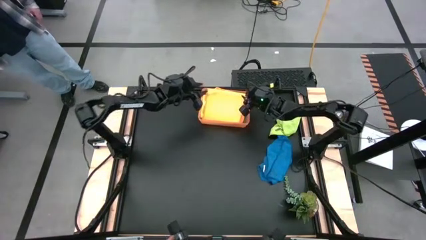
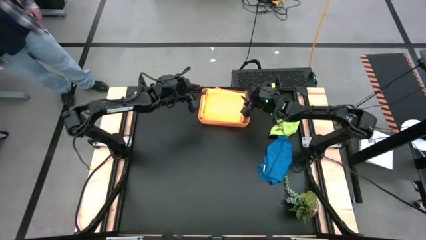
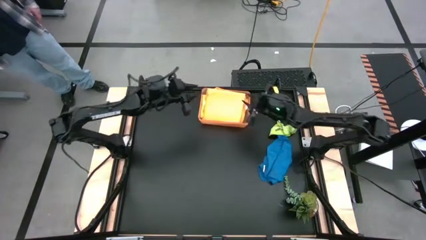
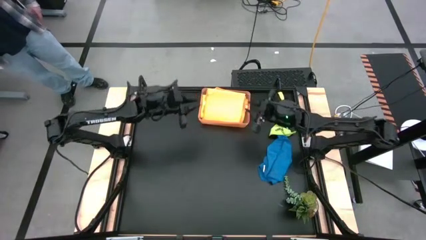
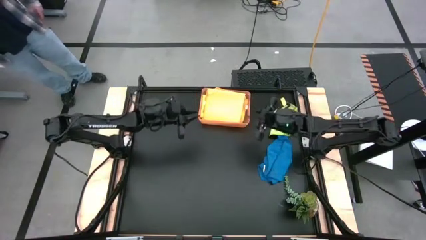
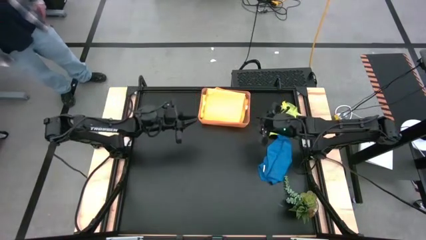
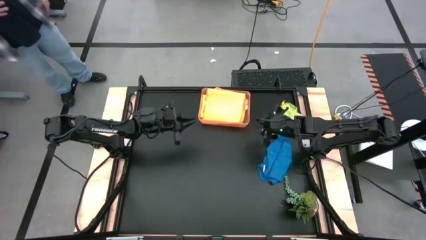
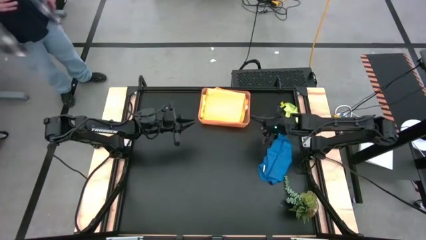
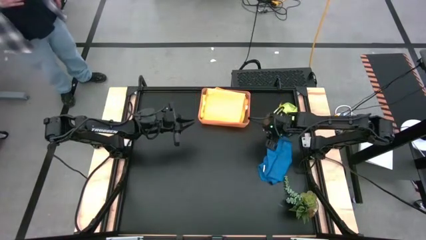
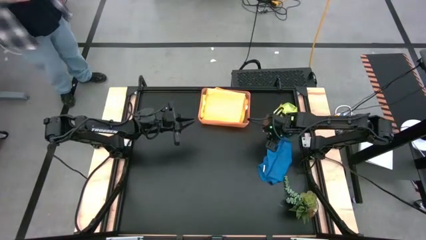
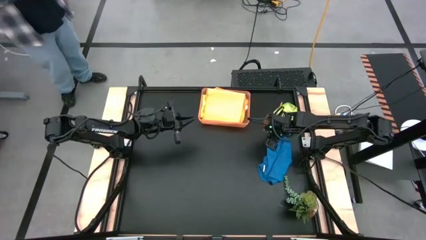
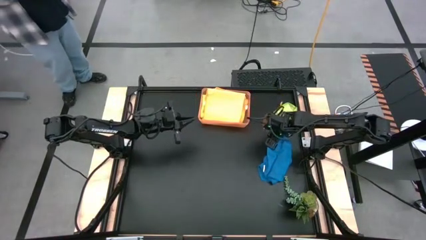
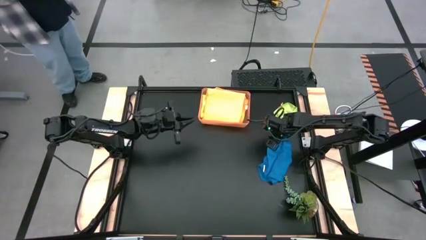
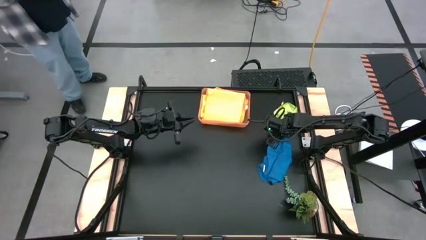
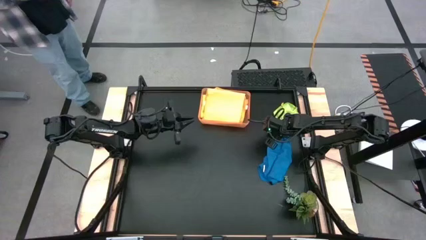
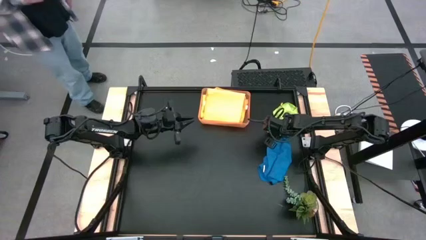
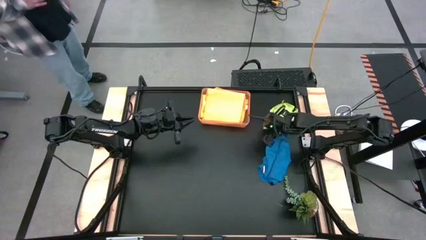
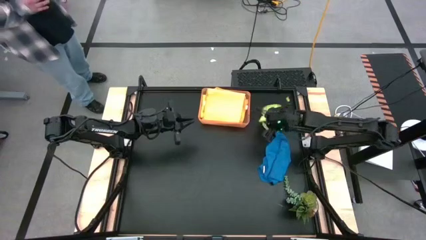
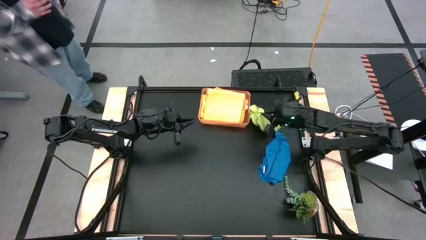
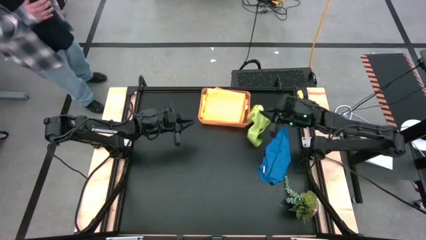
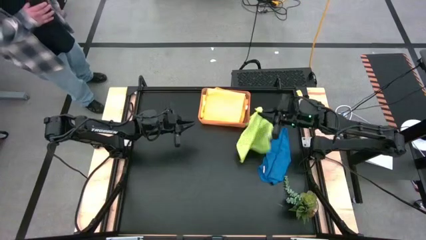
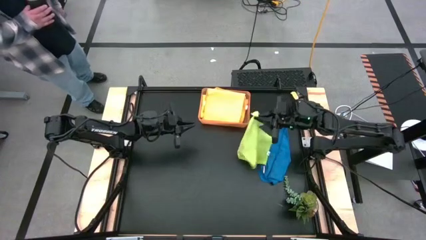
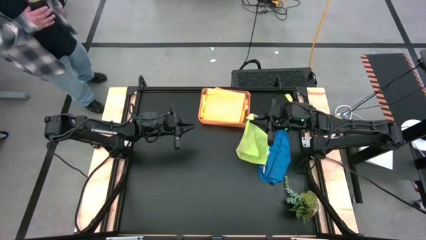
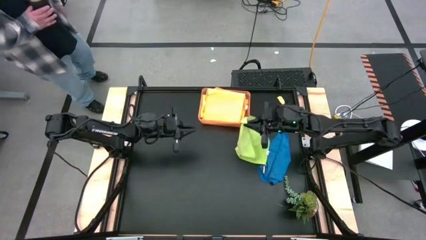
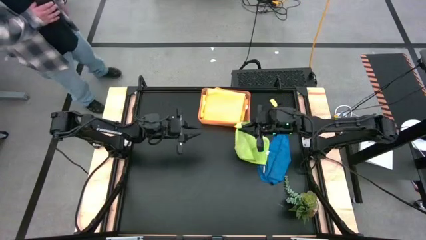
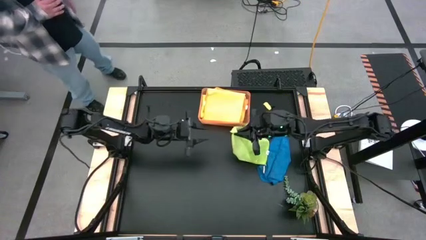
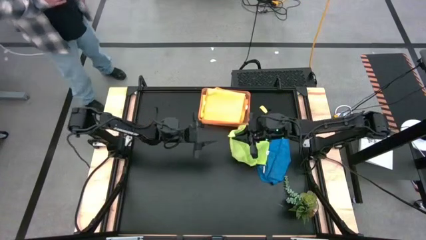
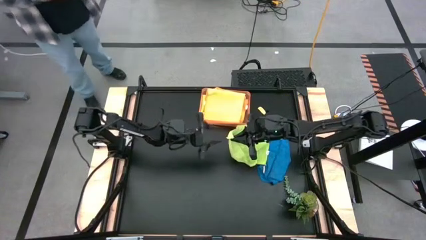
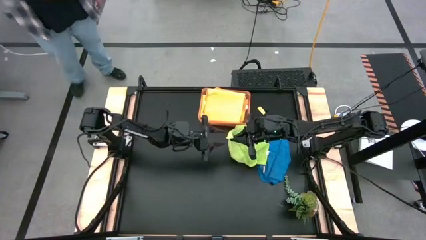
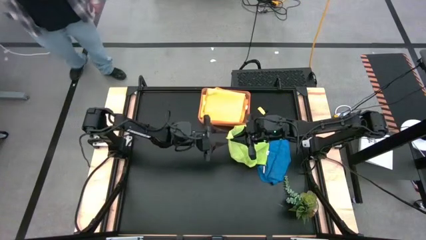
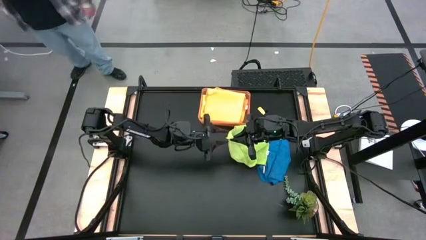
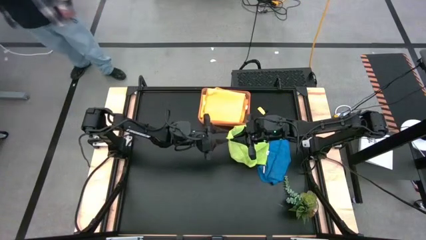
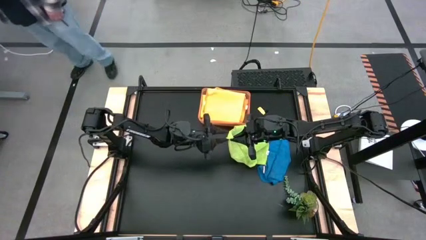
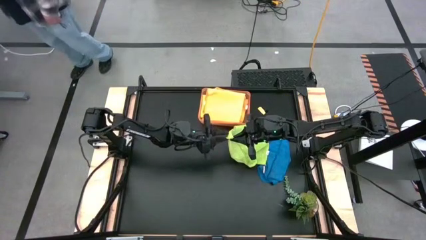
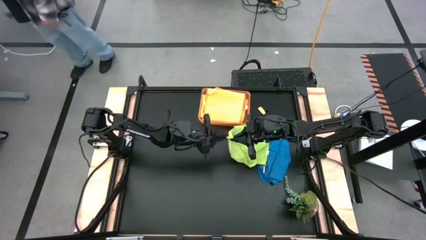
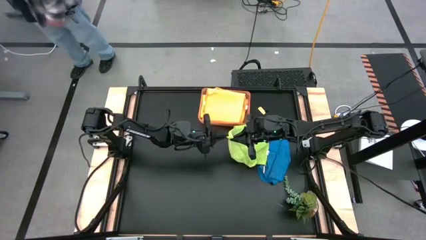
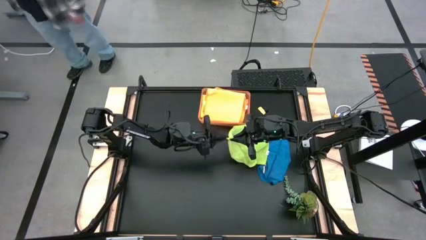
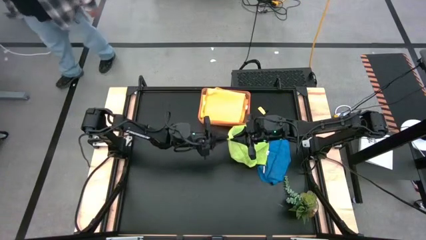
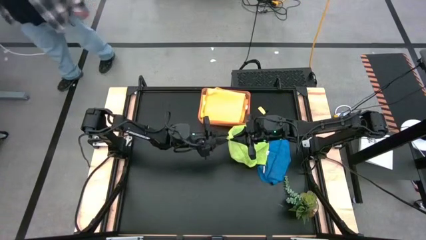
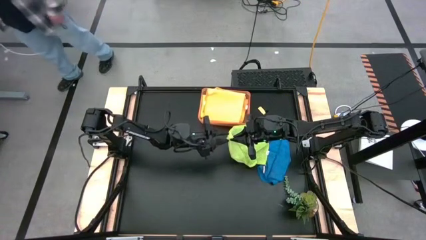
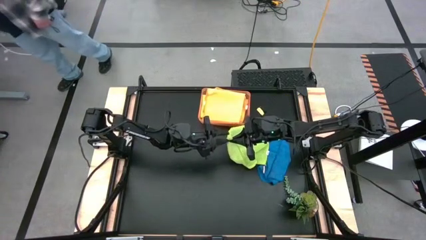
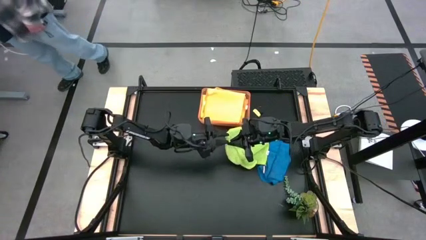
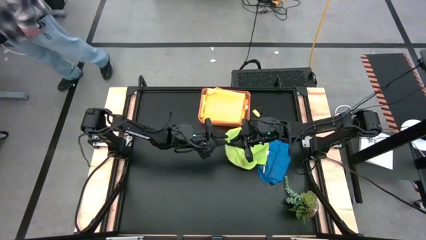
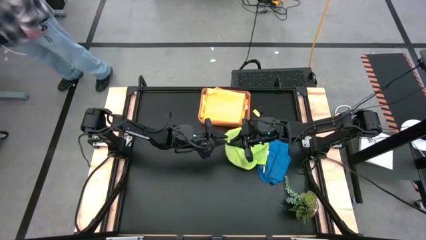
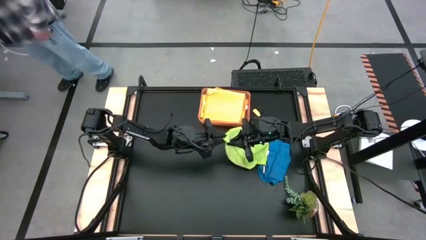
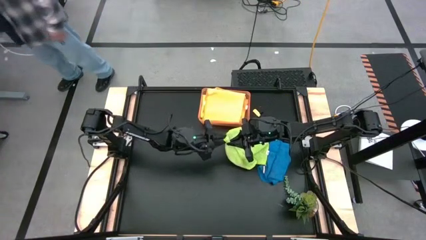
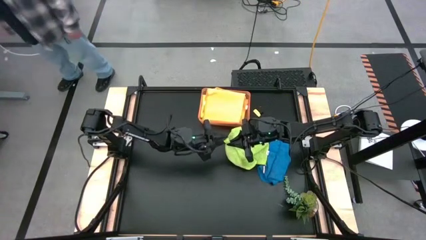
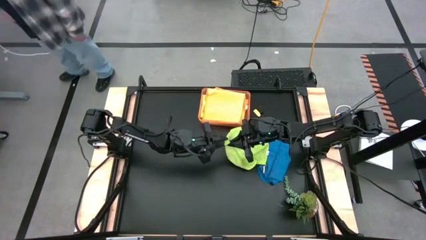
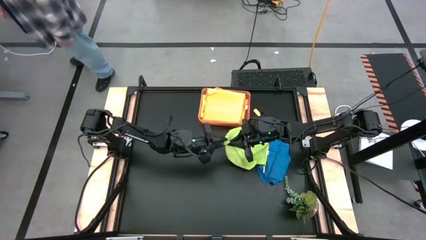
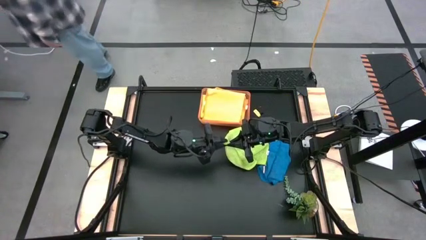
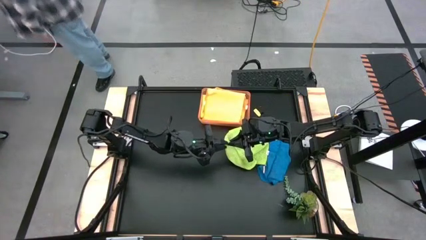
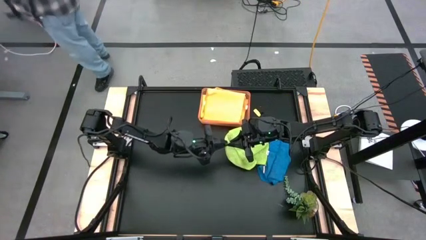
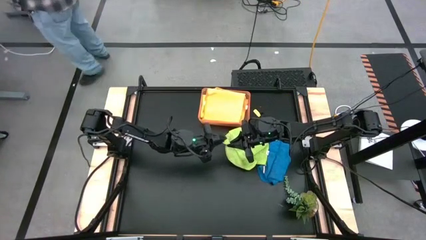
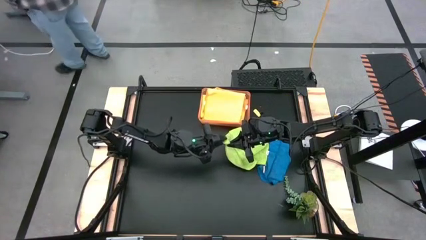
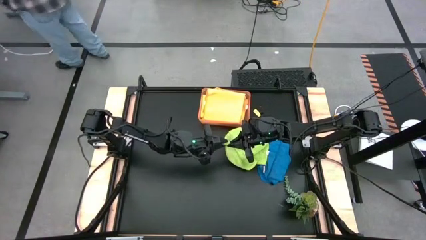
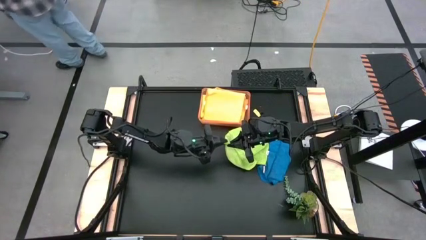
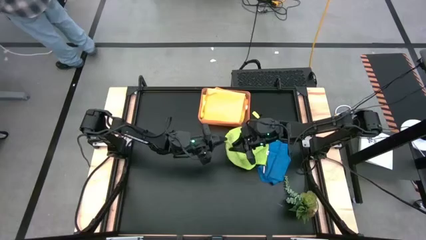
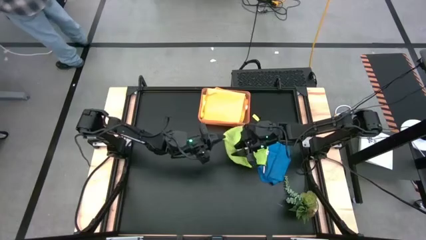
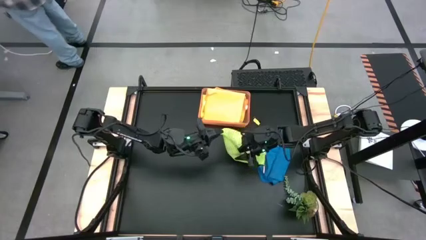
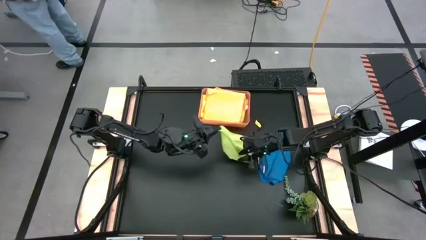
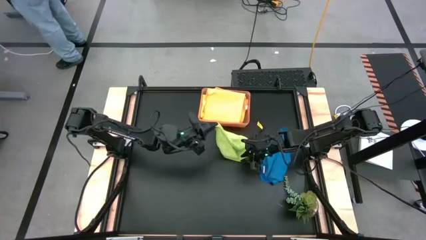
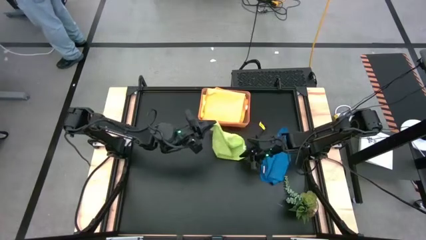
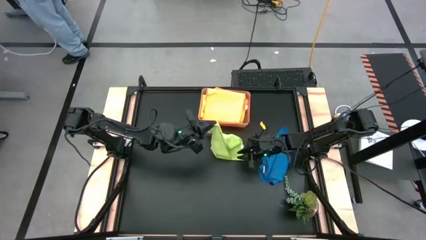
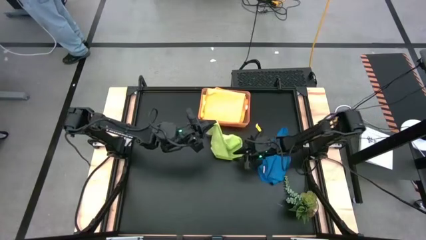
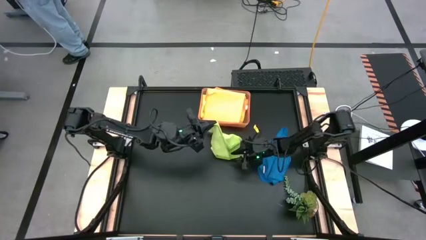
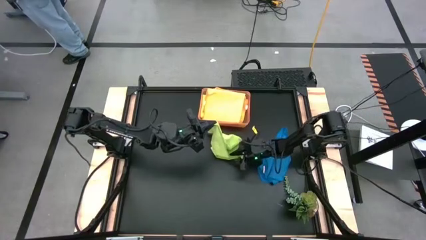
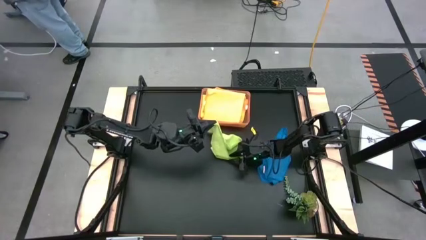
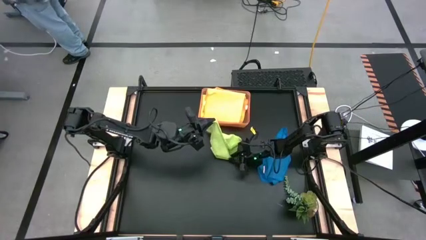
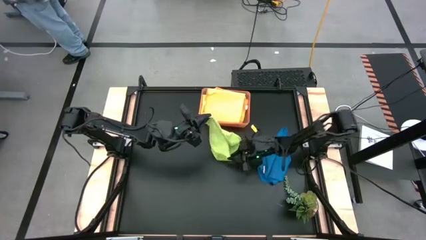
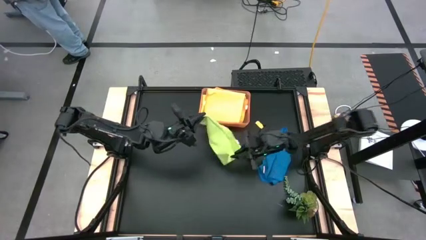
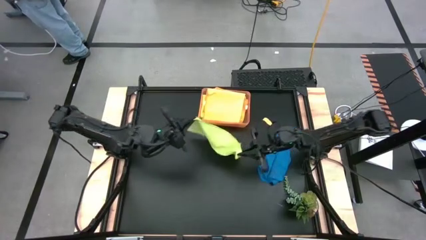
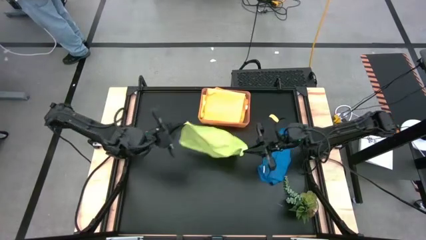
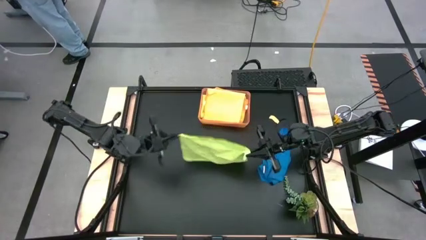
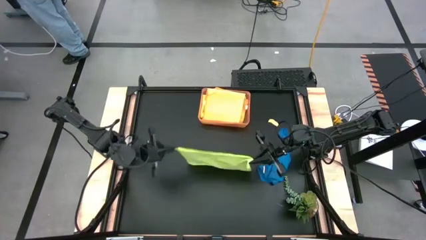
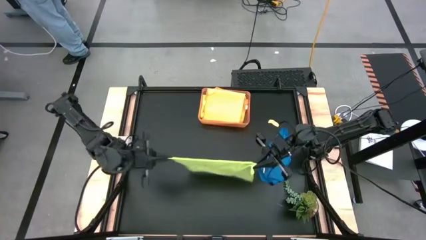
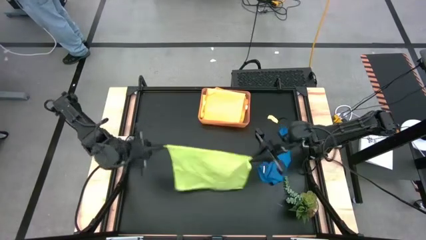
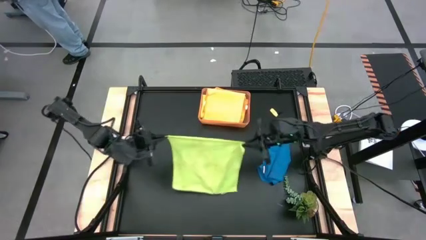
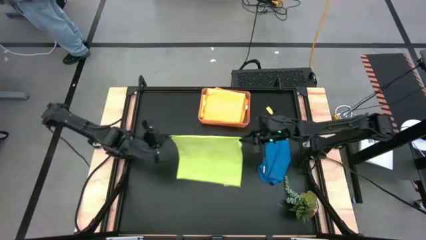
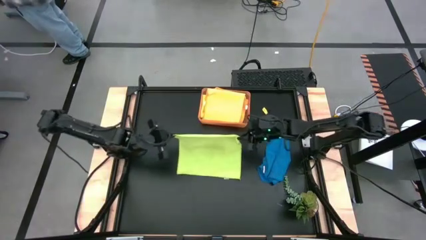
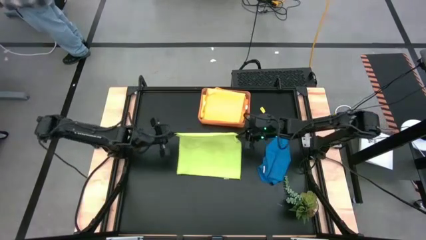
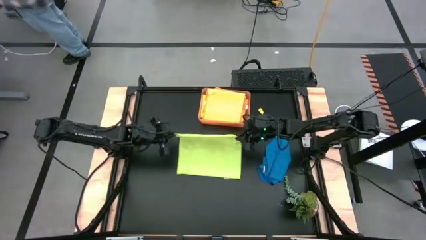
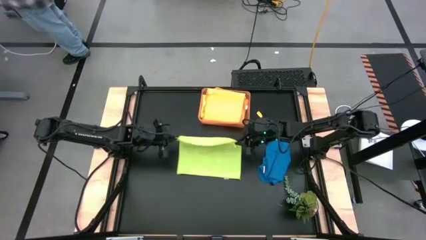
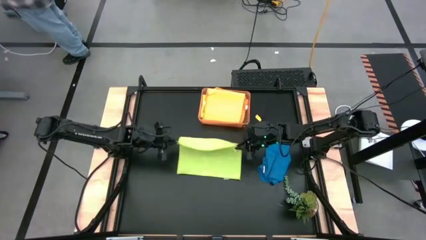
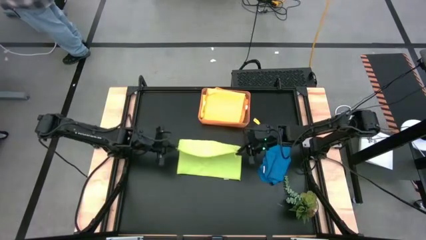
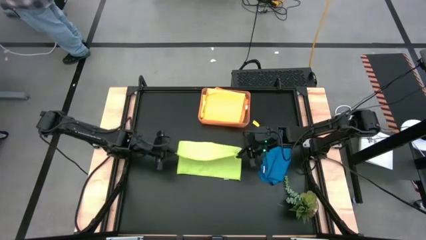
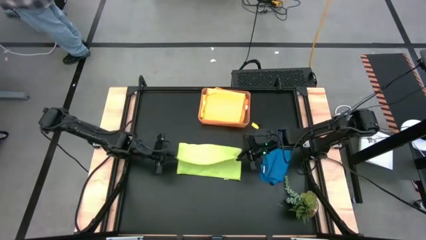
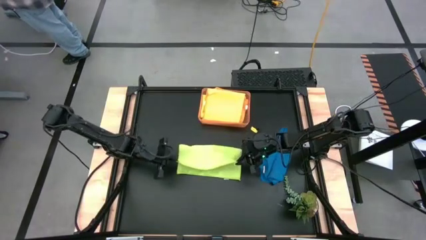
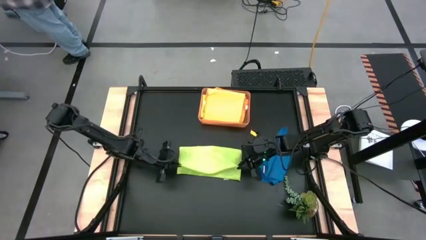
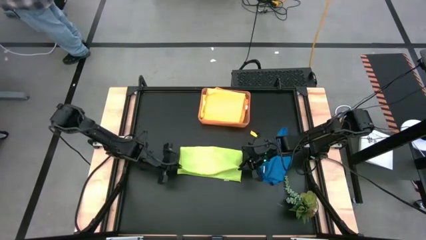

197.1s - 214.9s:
Task: Fold microfiber towels
Fold the green towel
